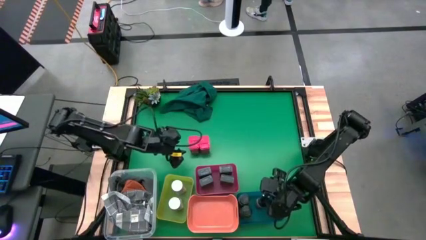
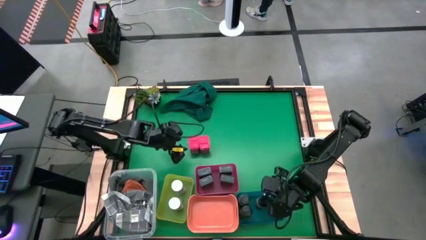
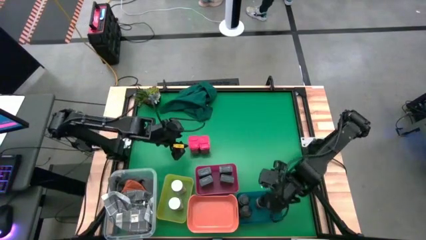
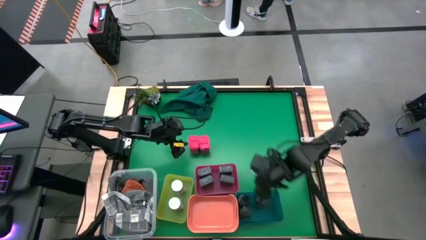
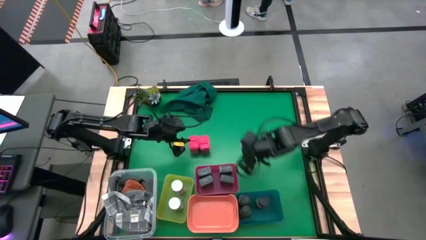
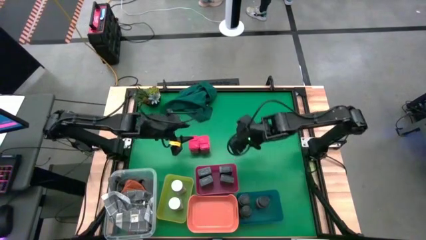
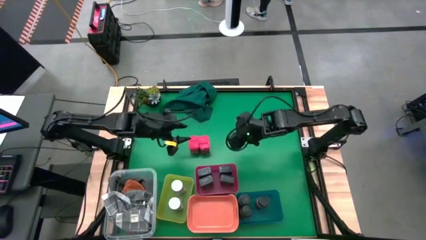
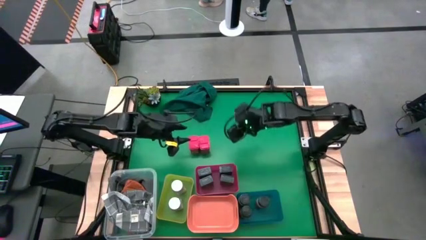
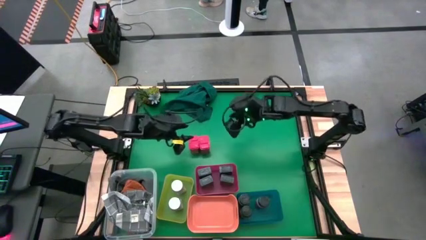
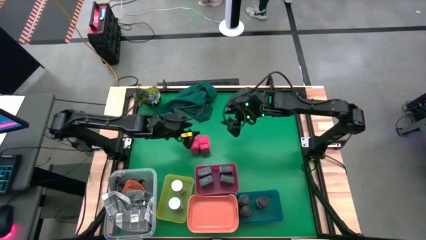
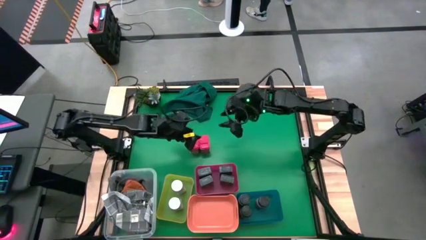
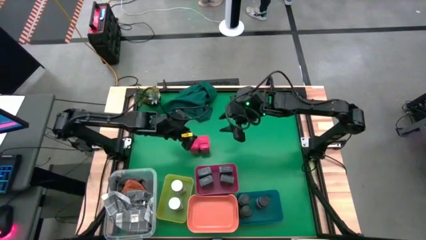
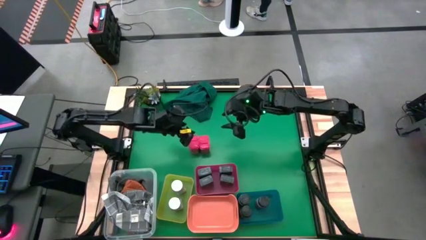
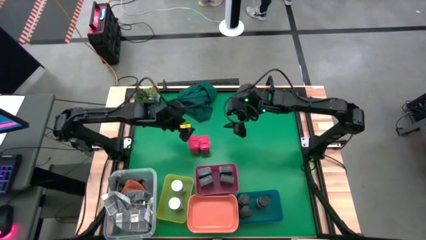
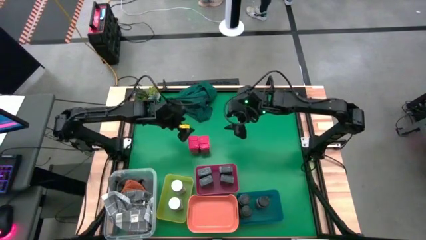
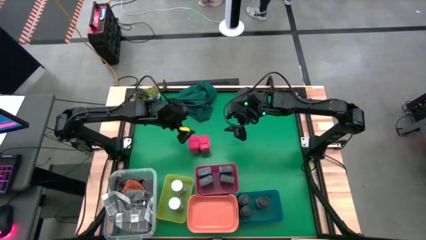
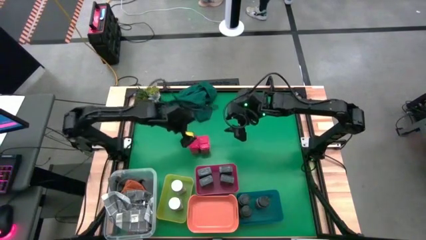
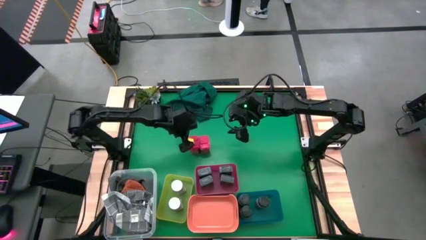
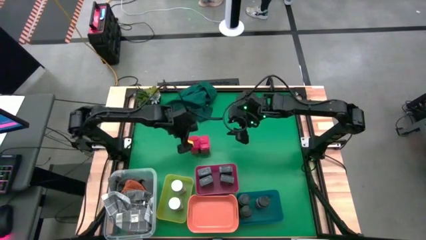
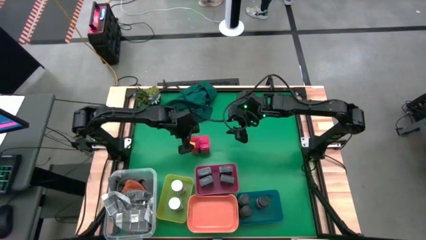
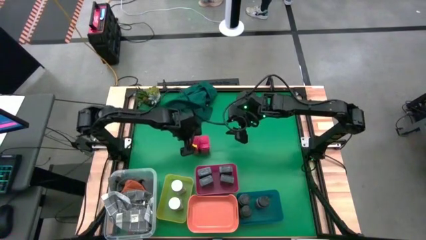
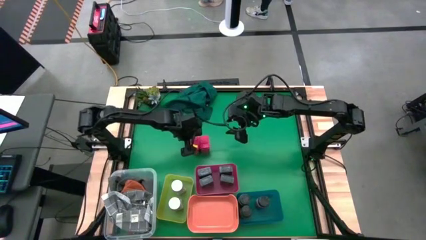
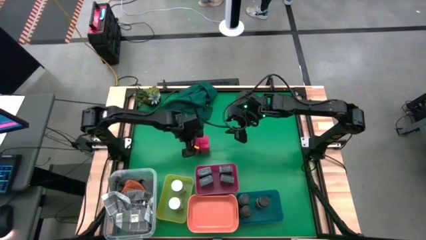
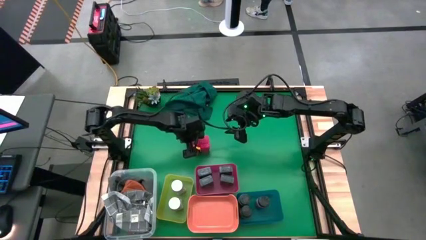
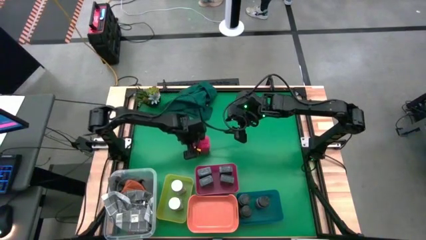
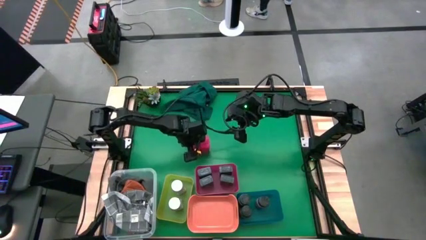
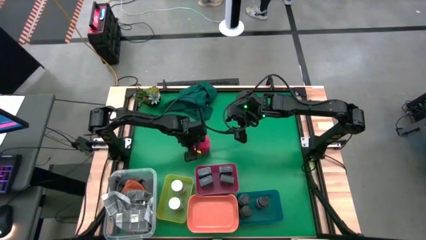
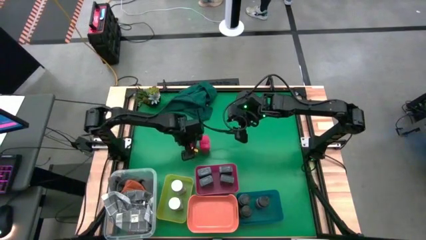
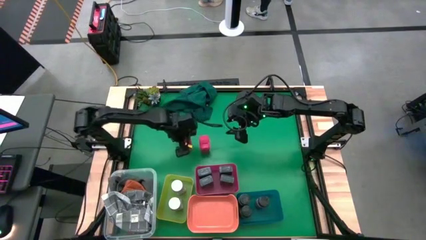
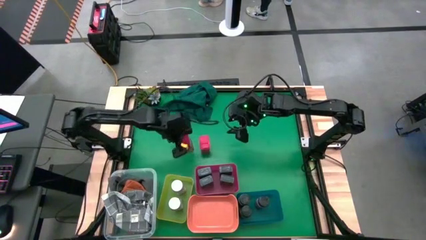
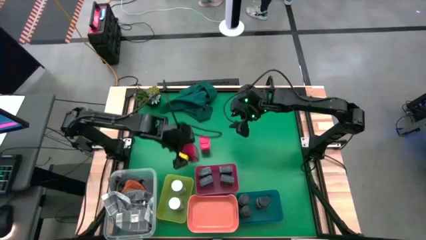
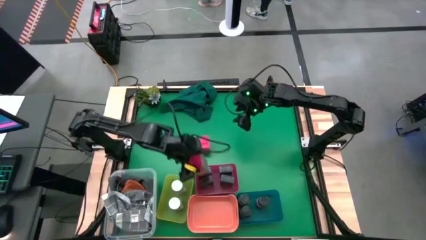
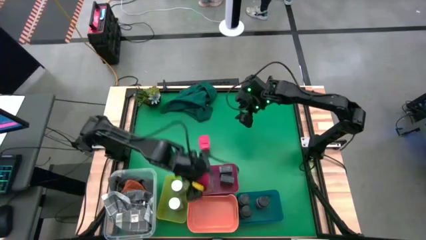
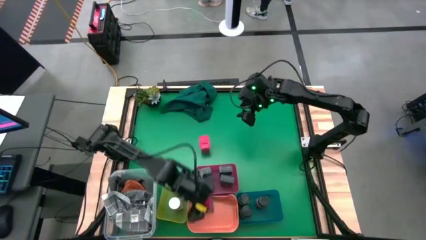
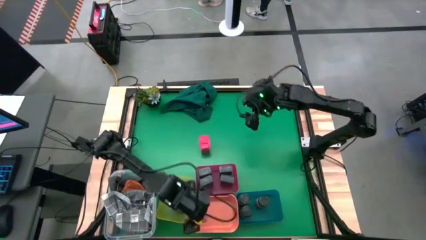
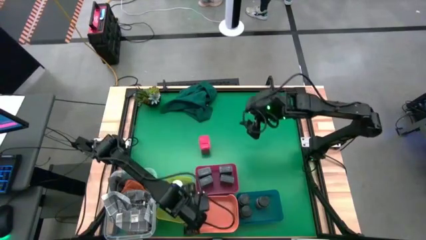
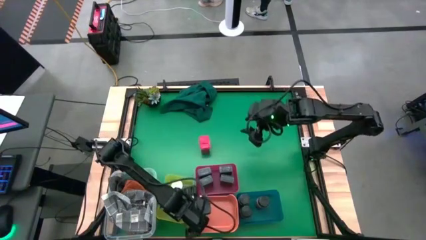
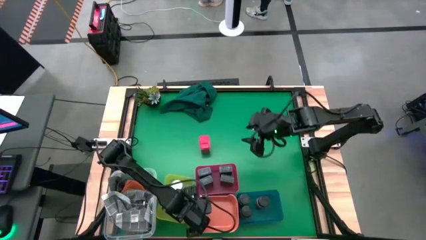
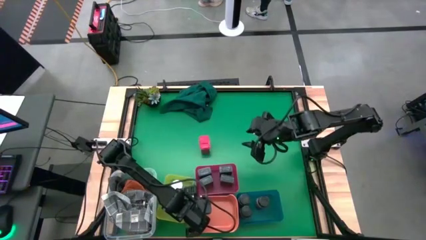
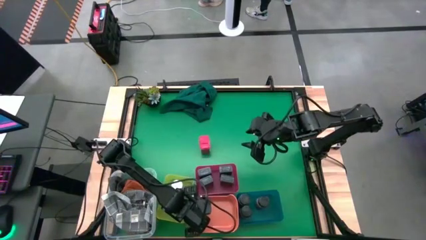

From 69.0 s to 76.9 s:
Task: Sort spices by type
Put the left red seasoning can into the orange bin

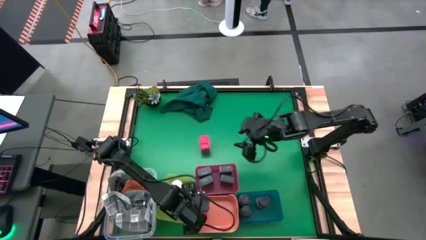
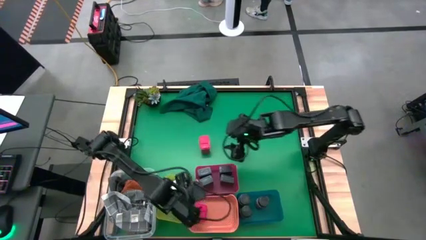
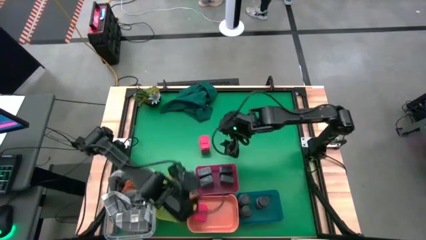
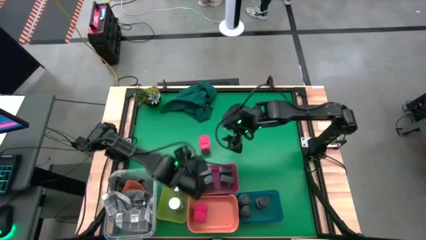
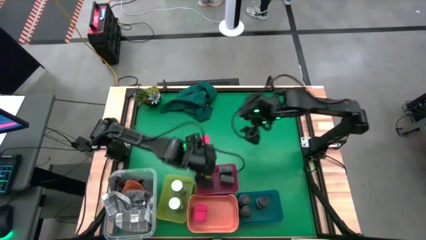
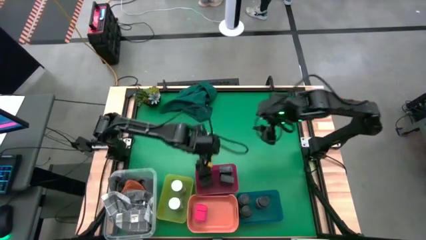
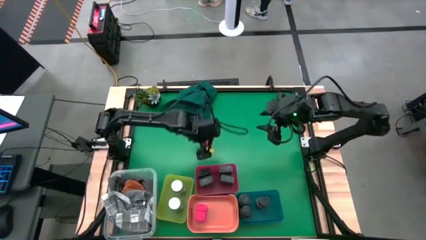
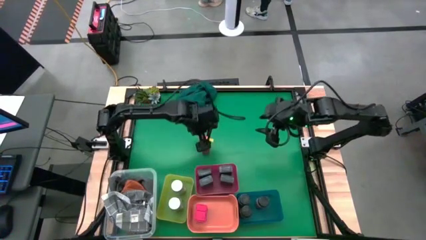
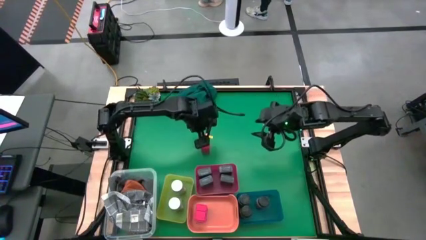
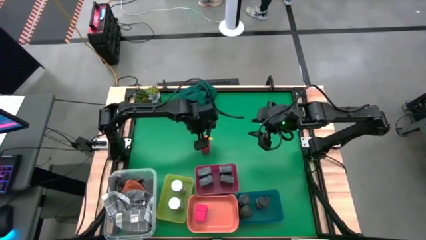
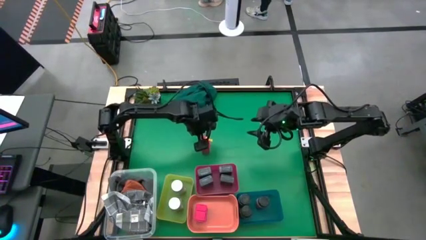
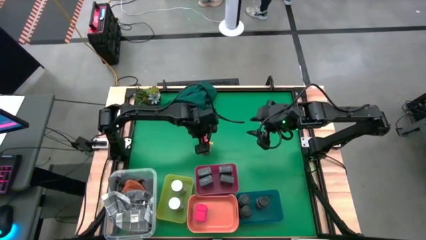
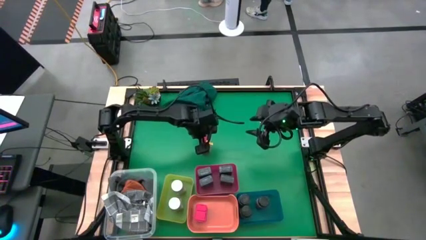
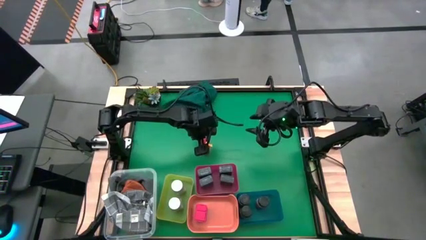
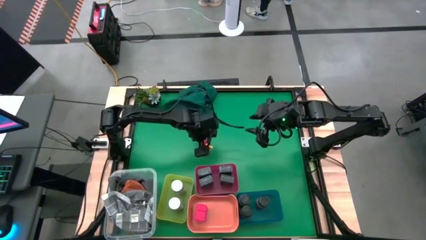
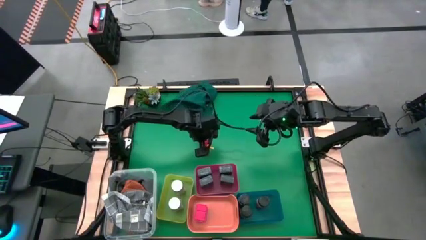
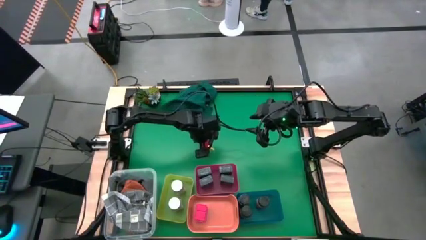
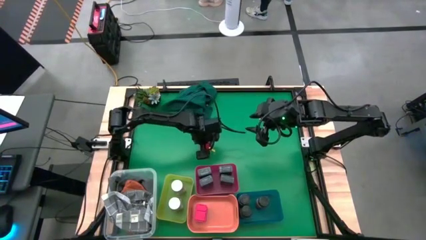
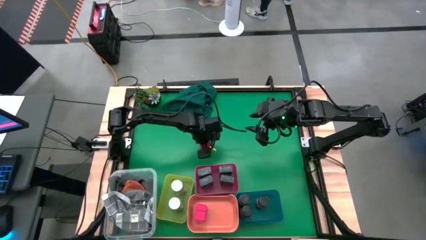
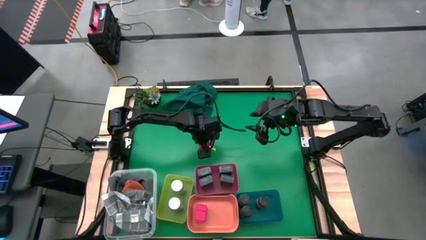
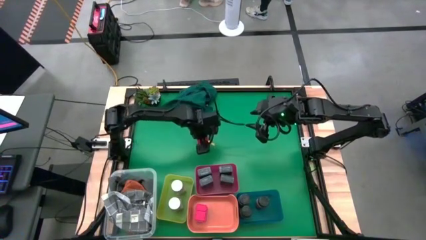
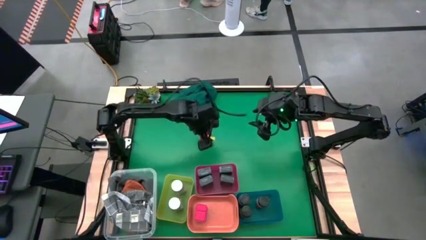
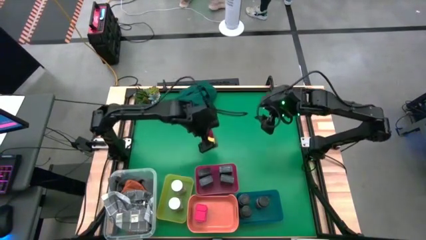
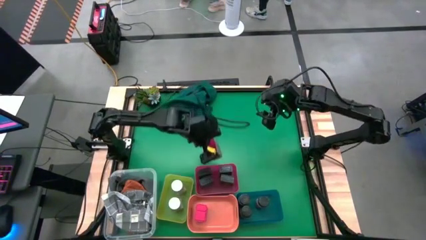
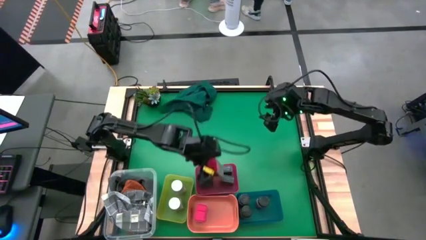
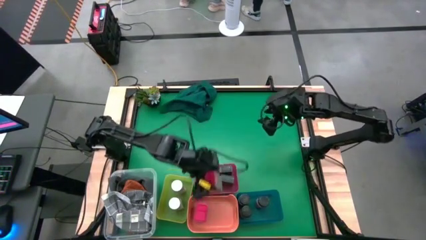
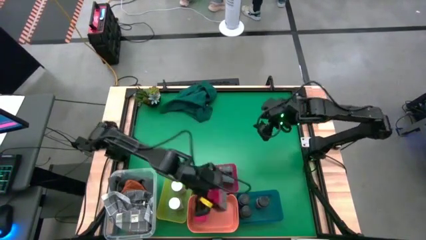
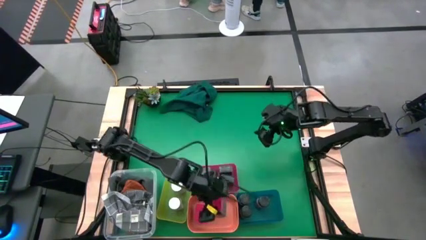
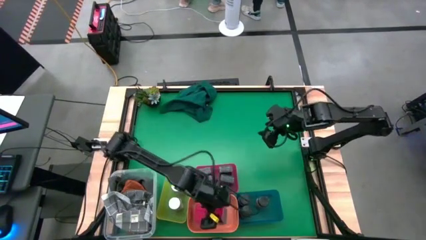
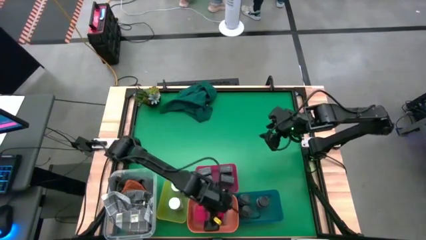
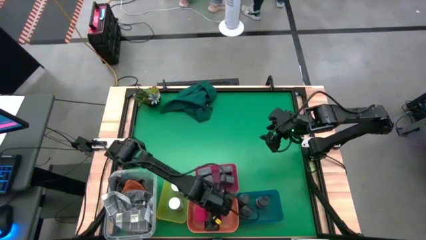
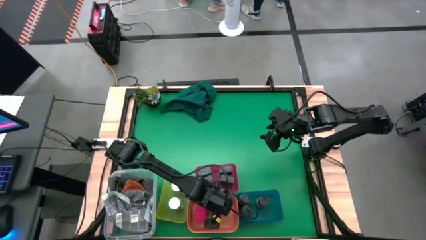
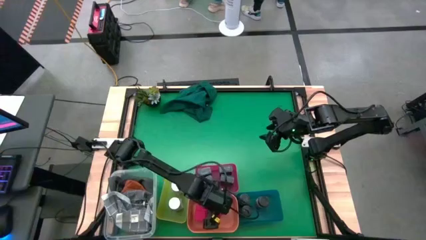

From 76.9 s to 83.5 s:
Put the red seasoning can into the orange bin
